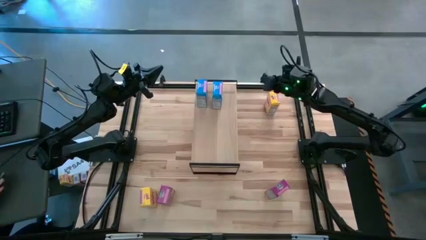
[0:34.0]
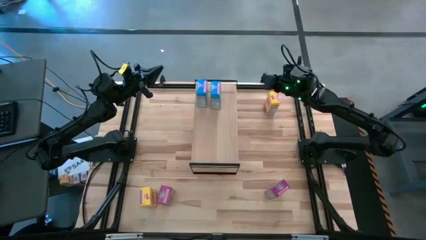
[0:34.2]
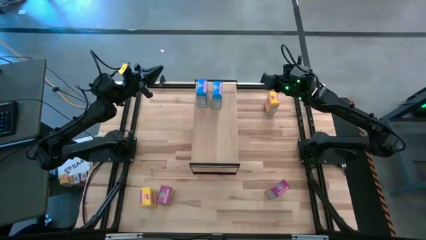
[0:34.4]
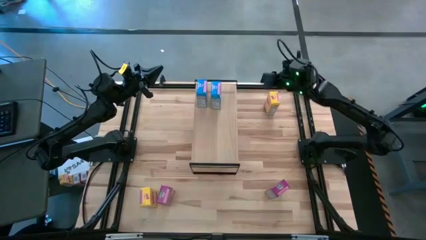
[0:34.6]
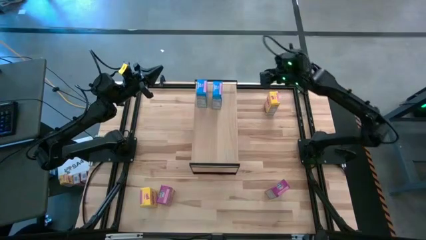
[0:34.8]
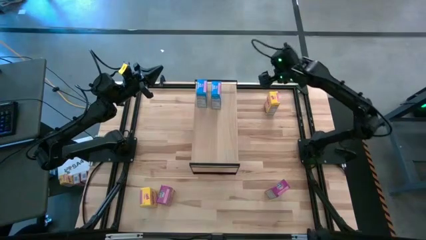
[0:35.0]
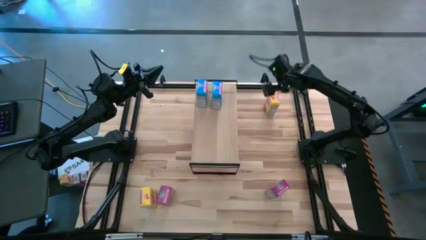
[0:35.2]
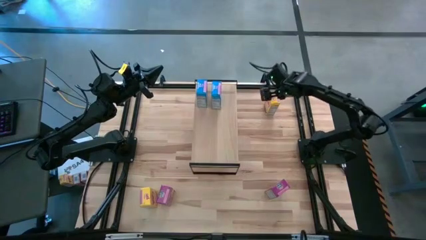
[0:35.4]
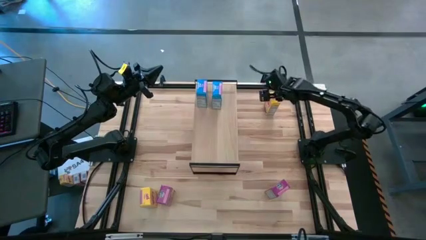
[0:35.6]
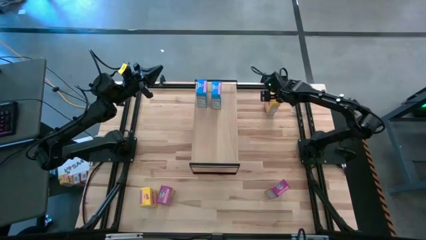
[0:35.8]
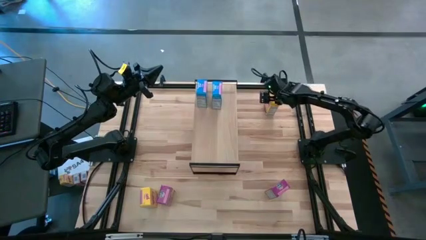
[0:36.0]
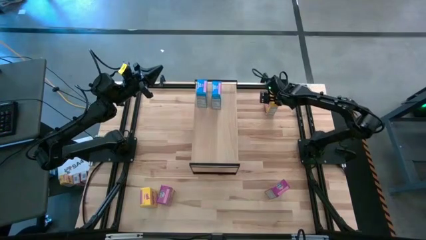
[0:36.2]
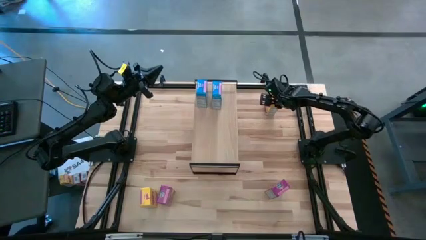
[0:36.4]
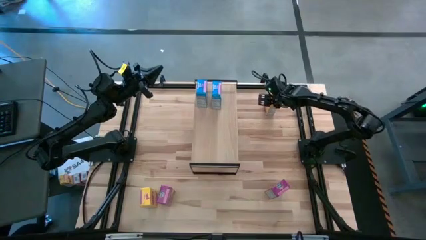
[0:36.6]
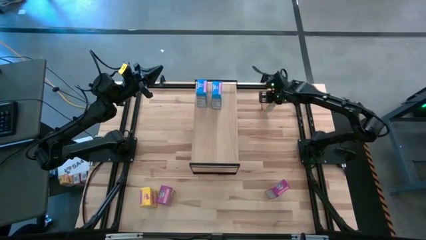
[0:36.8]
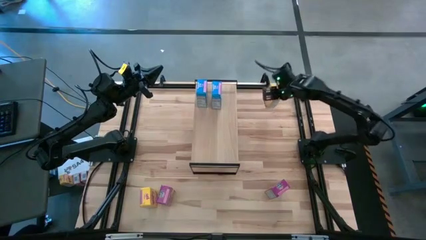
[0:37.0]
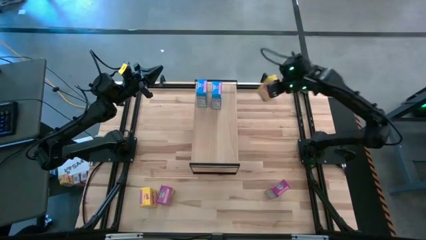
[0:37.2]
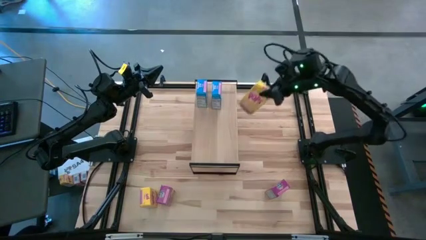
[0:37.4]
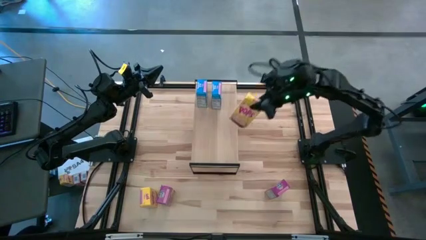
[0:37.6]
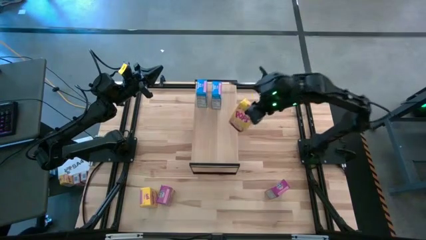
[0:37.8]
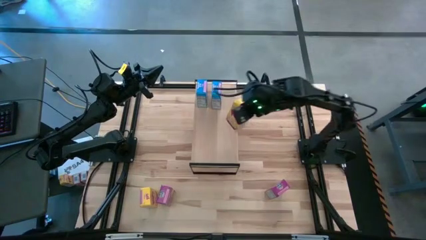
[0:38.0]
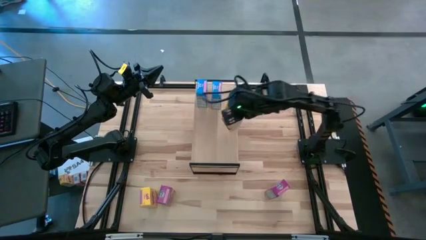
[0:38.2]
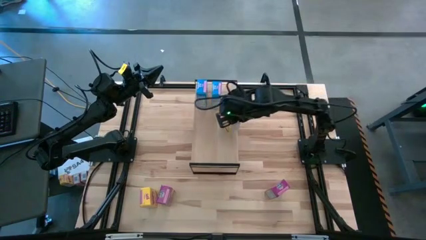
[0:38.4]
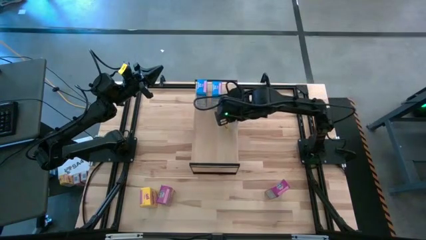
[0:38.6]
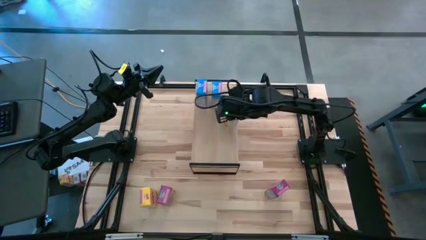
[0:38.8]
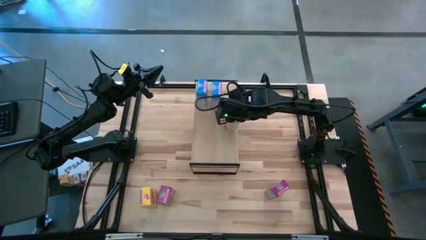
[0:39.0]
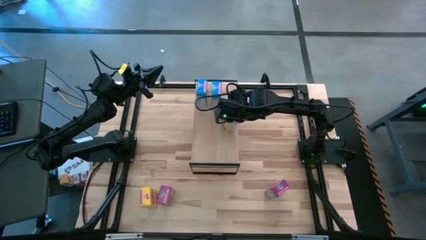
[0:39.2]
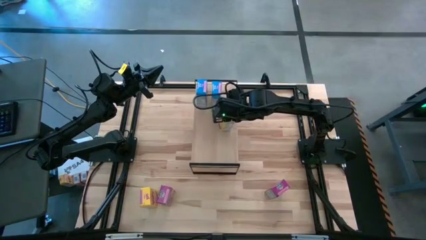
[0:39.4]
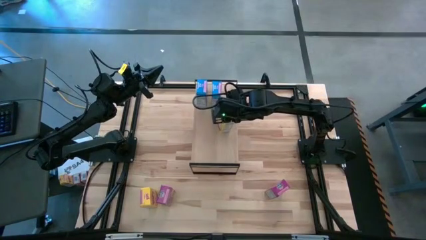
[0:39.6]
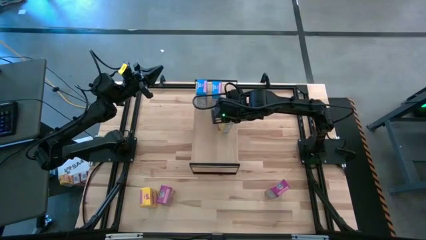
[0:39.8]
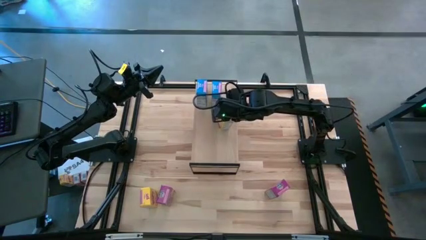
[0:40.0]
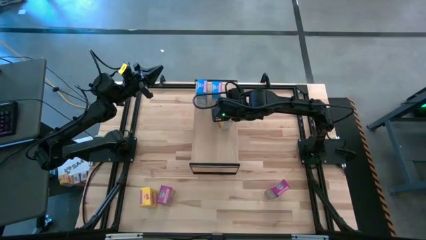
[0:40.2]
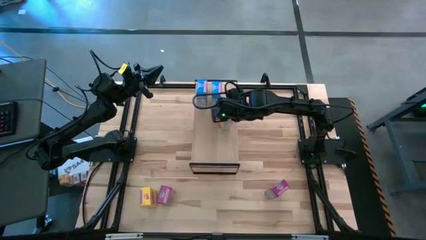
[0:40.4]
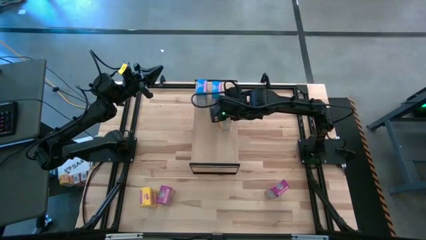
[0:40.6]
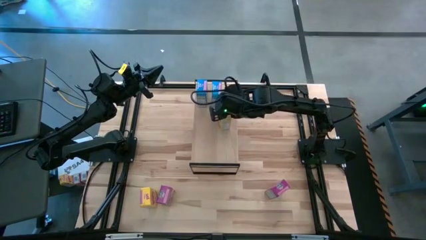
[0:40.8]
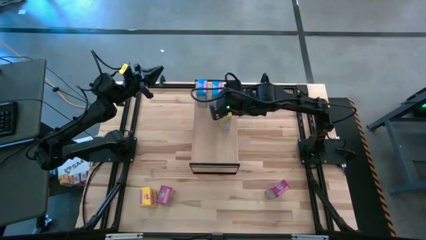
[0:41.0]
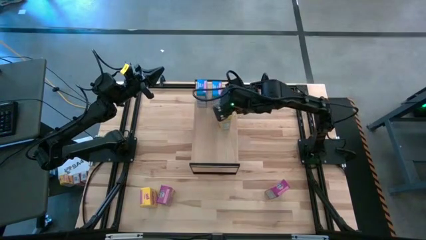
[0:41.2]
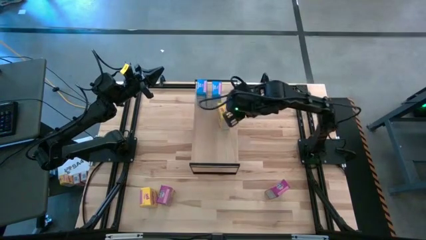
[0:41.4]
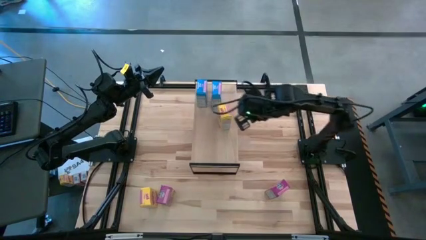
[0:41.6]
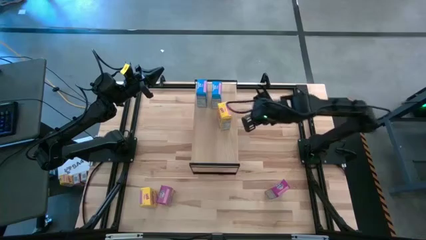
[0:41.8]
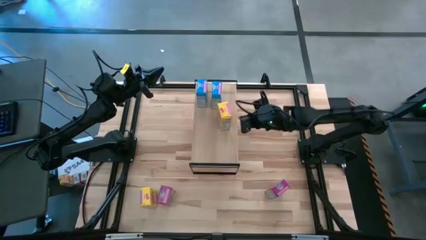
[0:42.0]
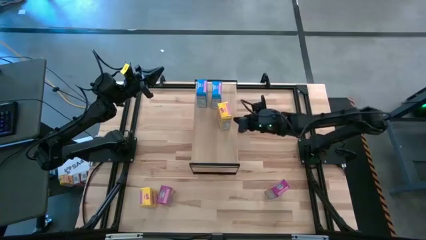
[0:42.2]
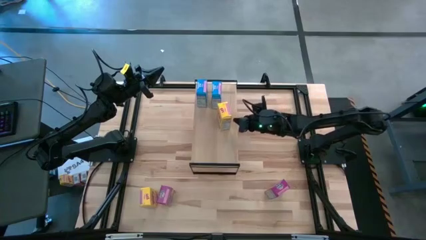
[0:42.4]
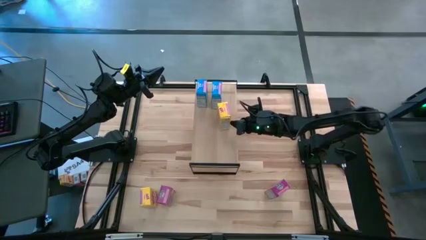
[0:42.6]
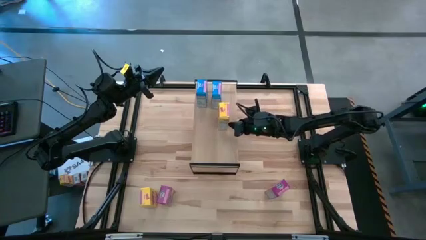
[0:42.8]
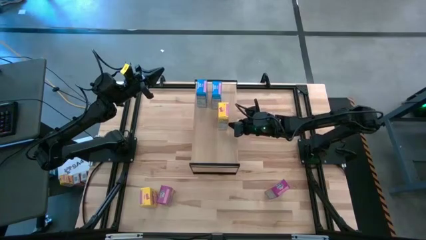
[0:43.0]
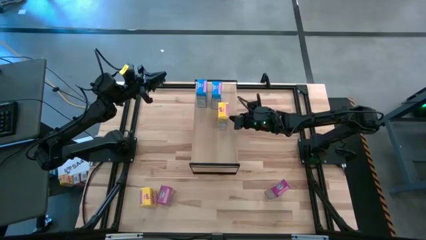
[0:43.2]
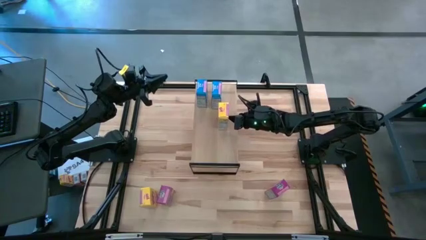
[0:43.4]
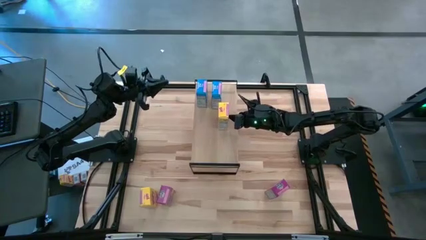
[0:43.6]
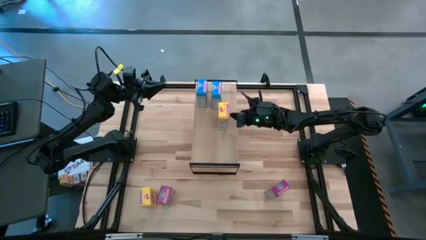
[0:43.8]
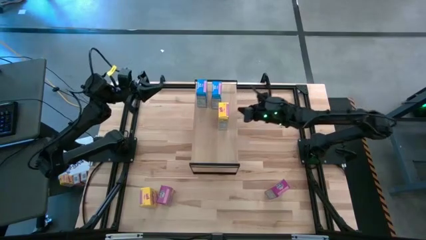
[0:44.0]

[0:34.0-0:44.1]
Task: Stack cereal on shelf
Put the top yellow cereal box on the shelf
